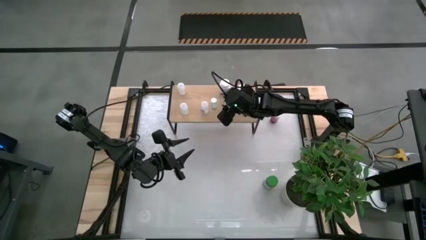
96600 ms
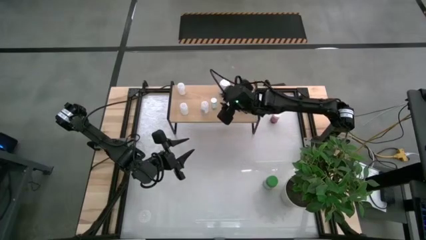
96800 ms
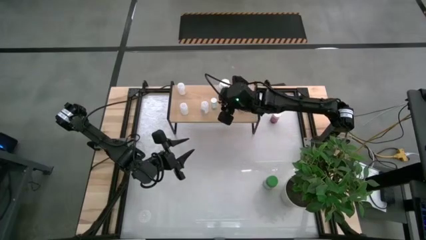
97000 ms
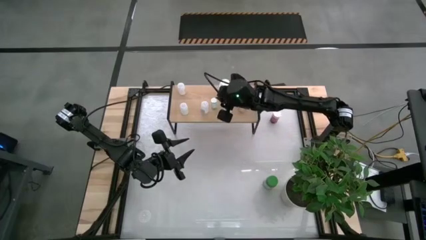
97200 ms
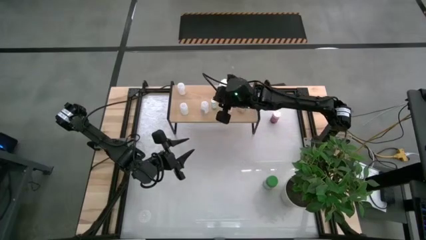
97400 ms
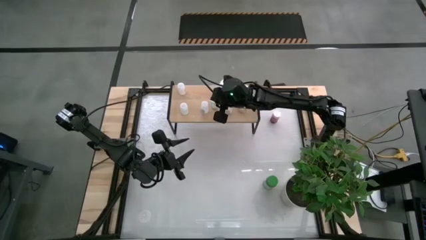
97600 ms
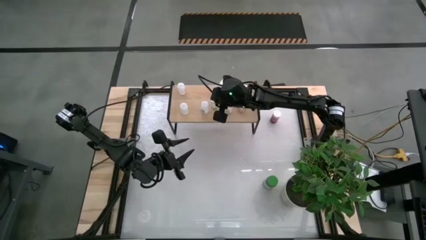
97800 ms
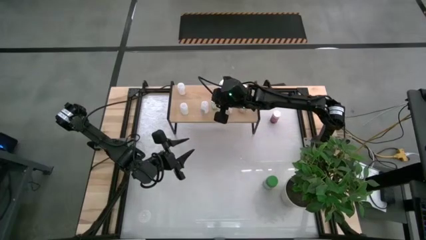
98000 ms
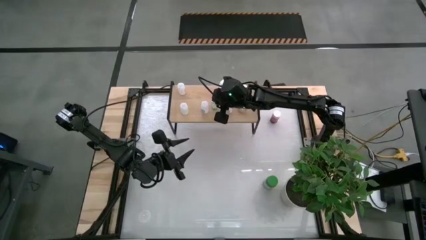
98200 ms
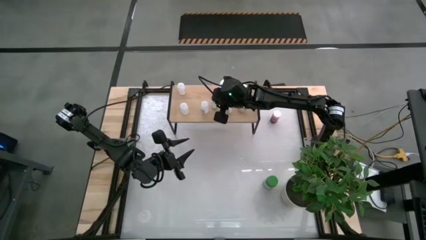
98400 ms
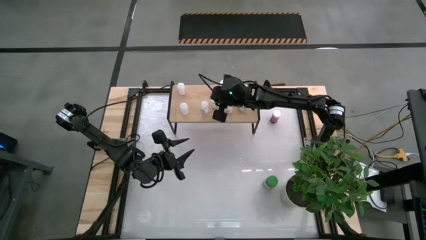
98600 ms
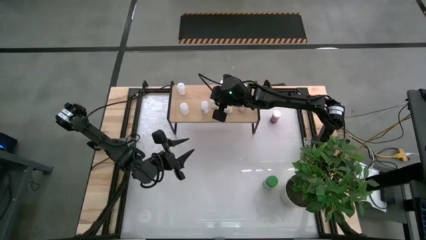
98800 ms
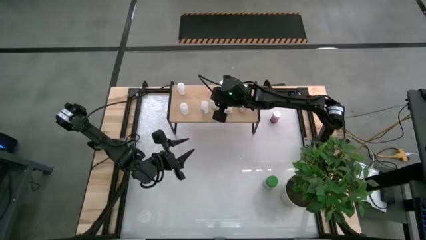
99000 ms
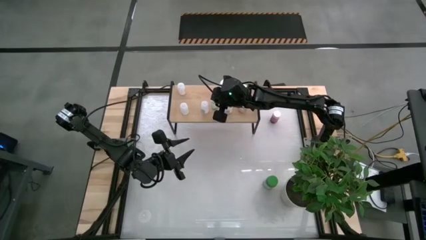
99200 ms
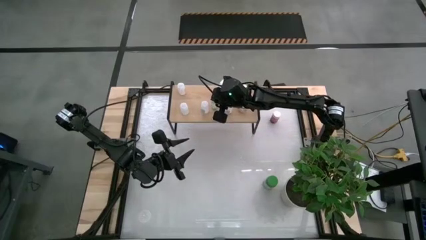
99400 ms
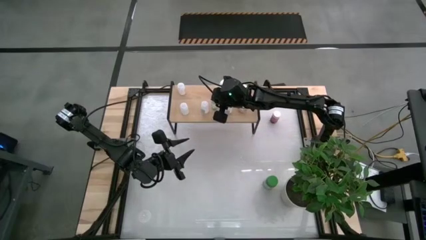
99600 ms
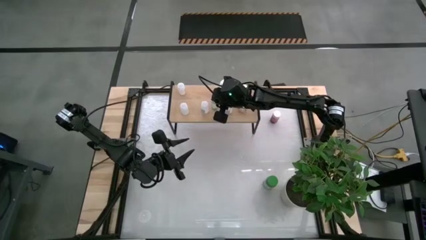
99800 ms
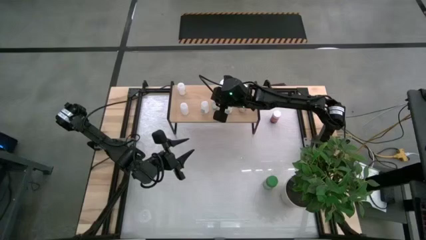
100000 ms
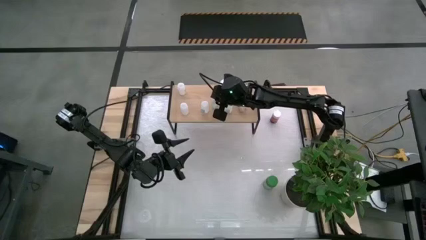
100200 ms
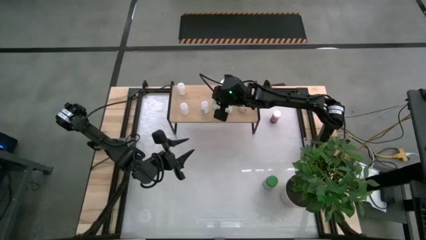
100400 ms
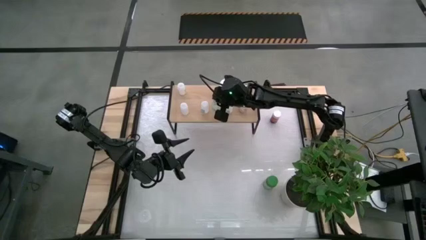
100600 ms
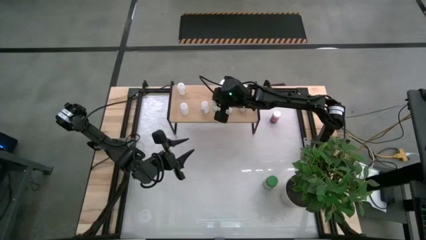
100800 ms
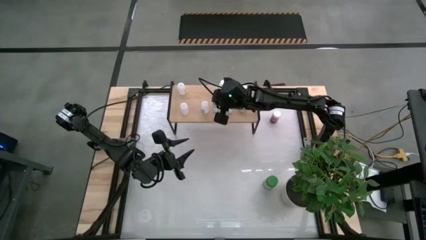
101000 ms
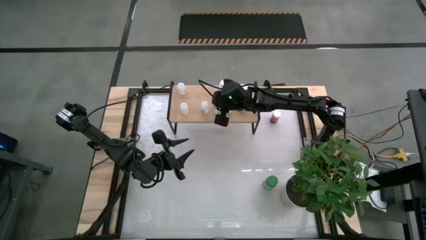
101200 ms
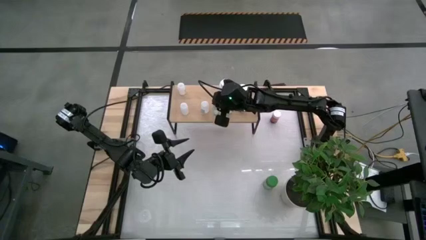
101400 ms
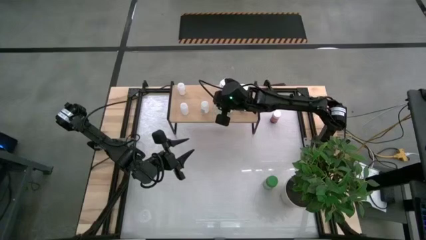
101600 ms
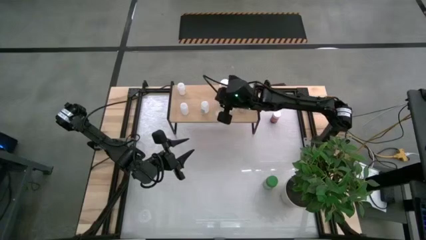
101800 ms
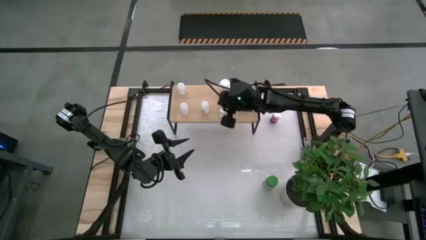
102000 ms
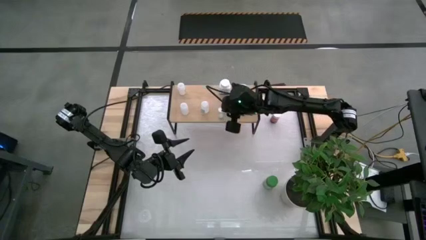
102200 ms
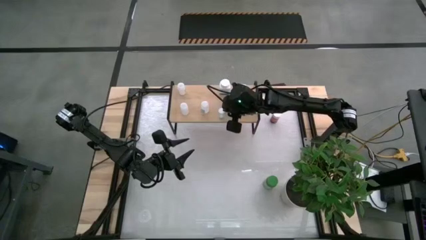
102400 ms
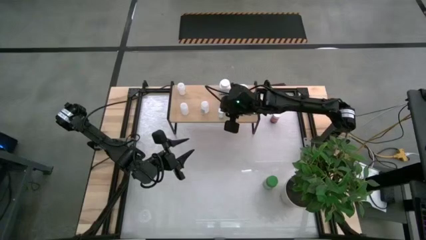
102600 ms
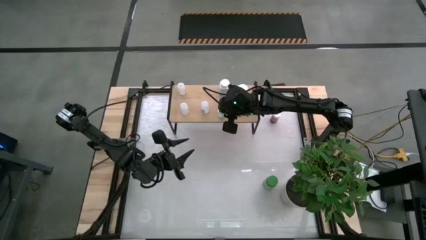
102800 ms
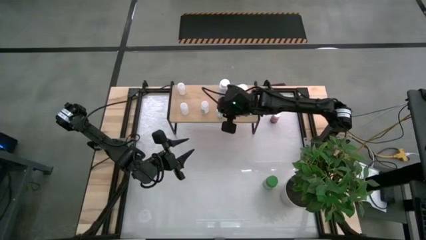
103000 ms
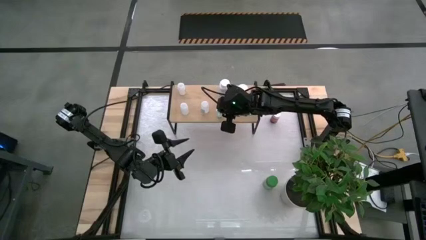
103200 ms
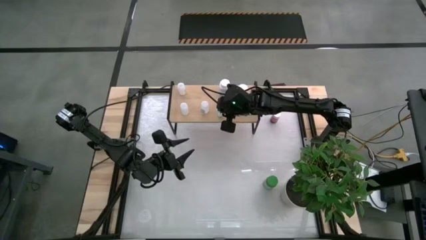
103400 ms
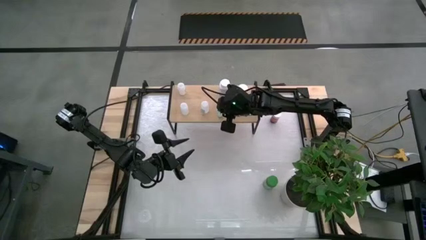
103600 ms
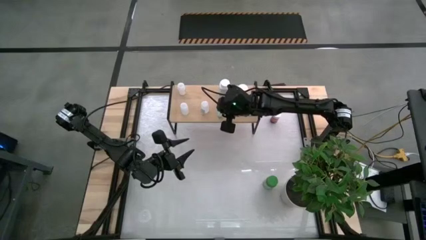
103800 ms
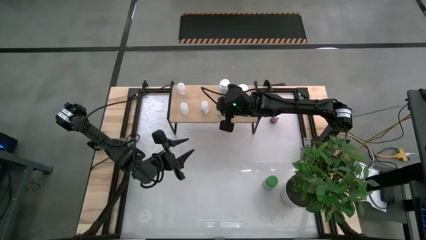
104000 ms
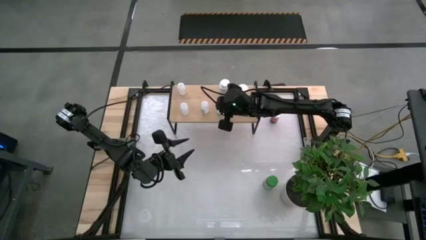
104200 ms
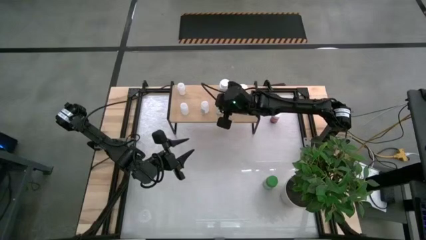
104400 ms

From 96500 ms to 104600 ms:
Task: Pick and place medicine bottles onto shelf by color
Adjust the green pill bottle on the shelf

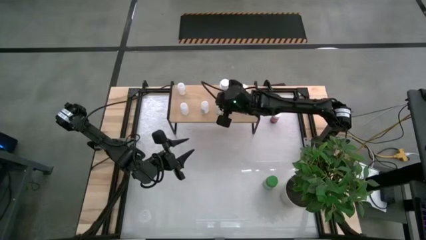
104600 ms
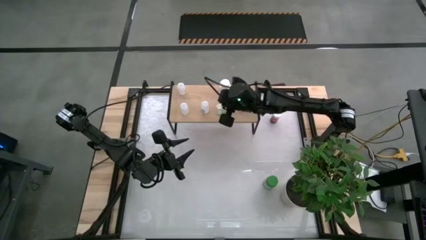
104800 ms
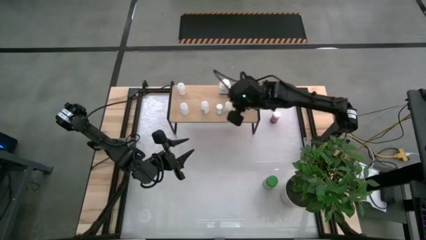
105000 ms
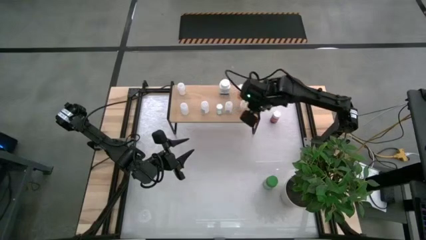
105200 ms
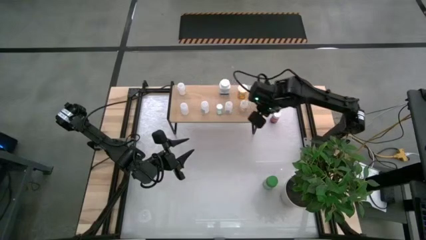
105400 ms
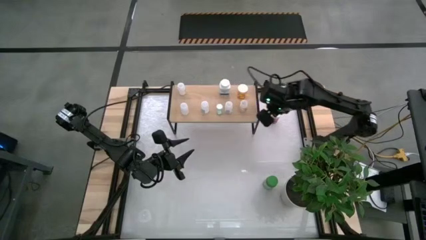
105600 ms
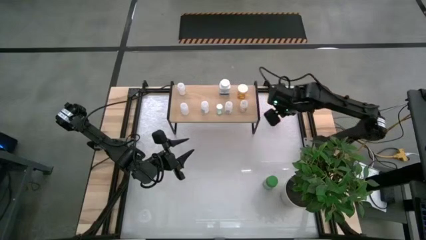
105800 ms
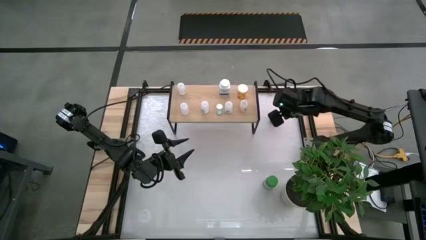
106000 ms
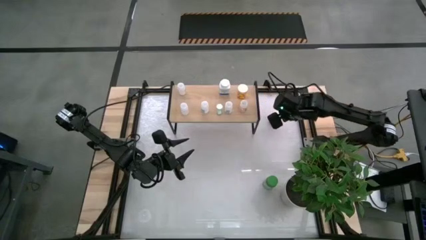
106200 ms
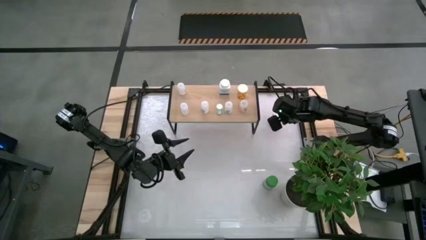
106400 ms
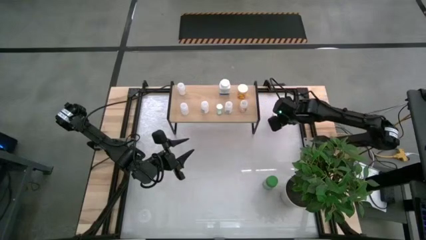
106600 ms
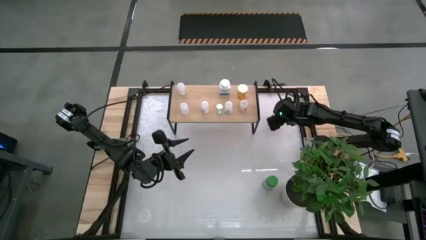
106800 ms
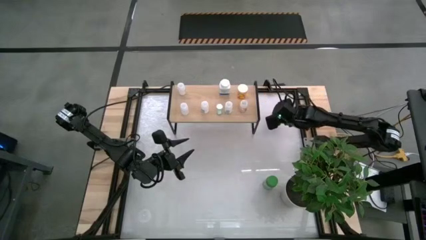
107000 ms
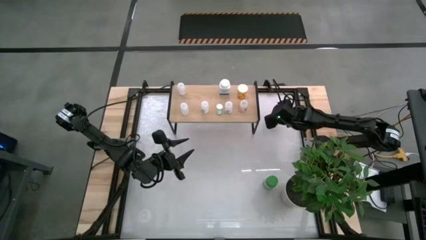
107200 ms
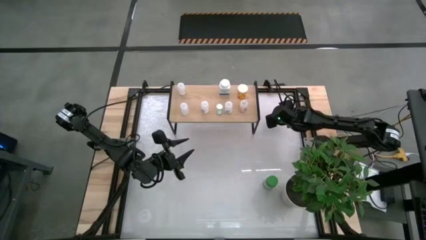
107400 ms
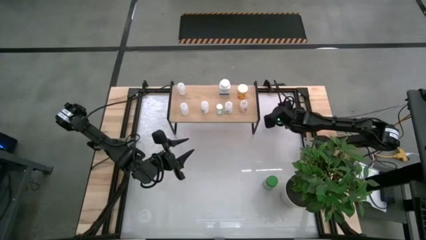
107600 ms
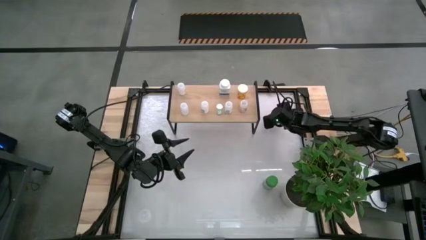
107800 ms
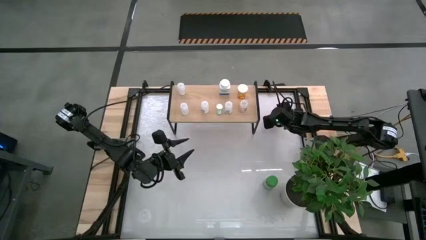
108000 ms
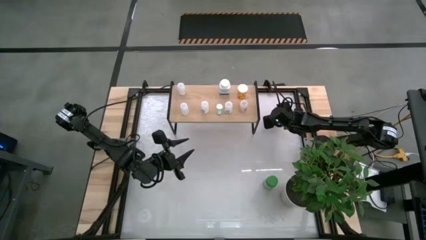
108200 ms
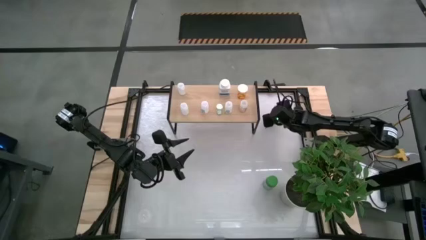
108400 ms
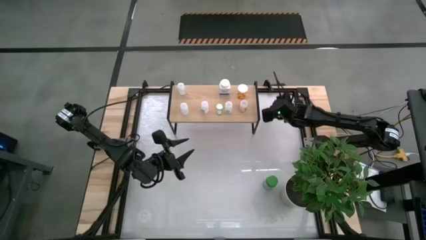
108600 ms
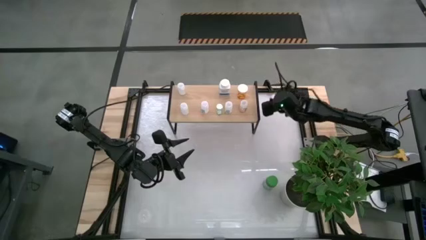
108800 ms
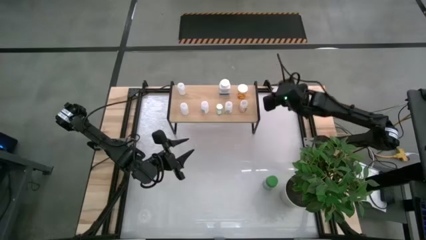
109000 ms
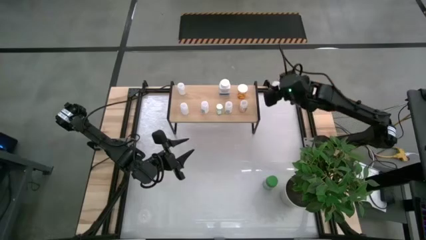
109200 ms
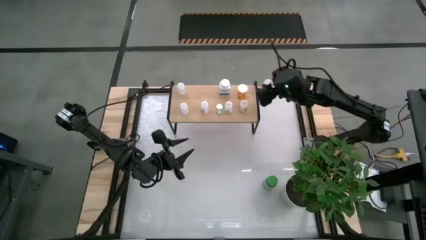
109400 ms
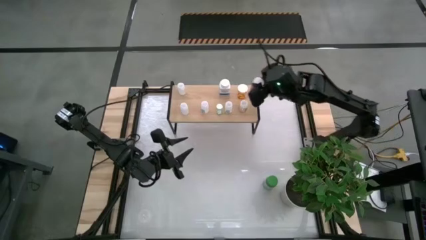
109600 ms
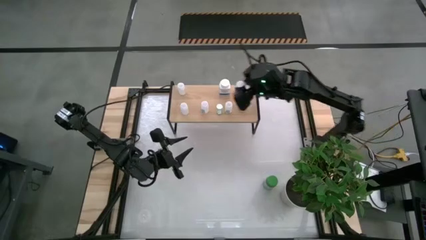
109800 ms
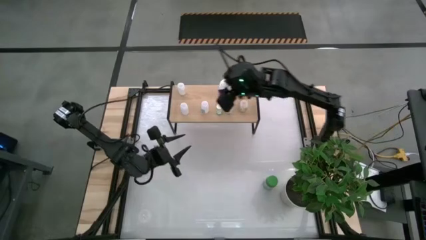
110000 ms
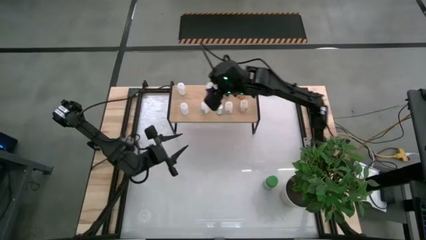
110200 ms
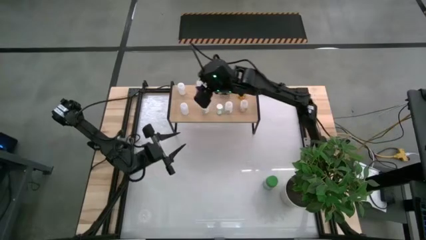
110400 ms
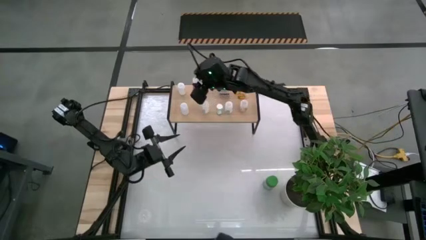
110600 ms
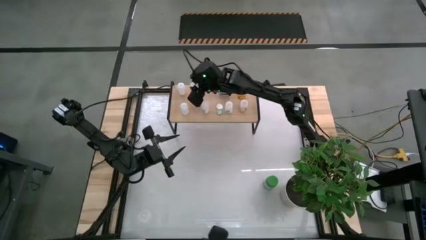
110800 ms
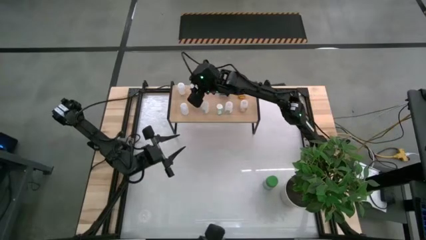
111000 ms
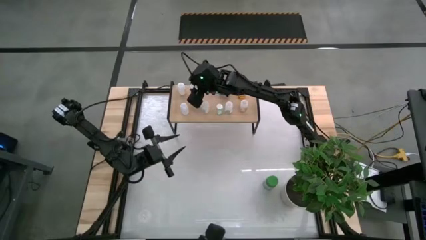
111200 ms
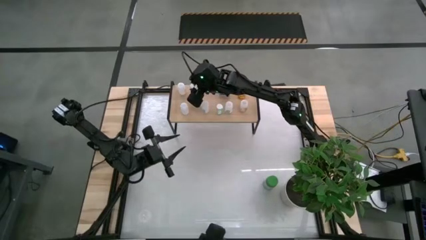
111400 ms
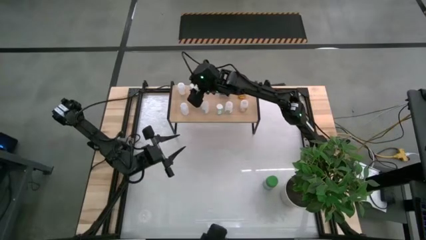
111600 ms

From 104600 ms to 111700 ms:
Put the pink pill bottle on the shelf
